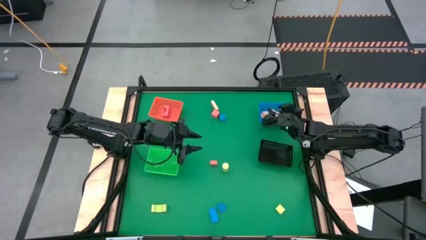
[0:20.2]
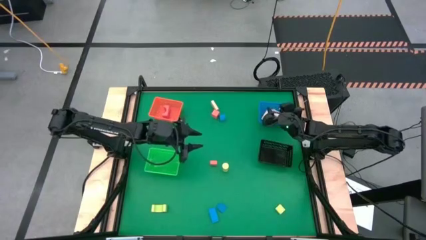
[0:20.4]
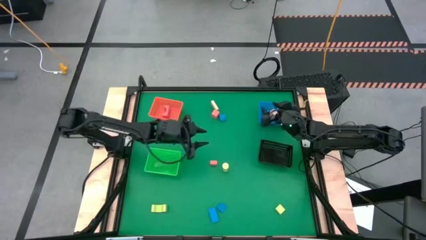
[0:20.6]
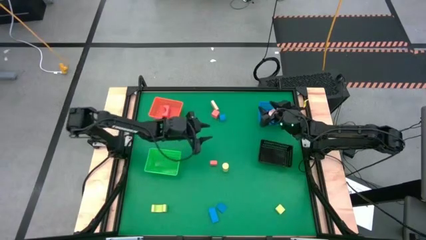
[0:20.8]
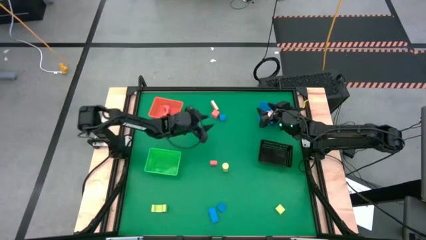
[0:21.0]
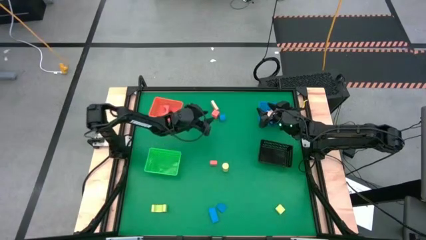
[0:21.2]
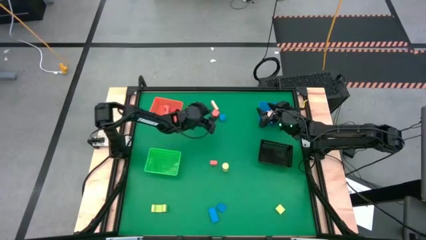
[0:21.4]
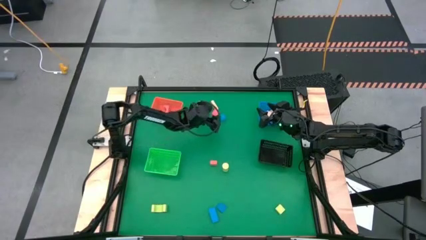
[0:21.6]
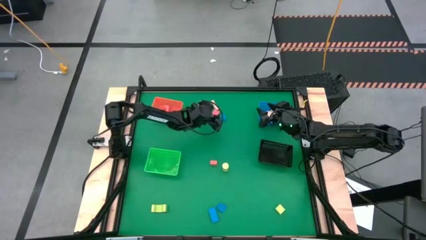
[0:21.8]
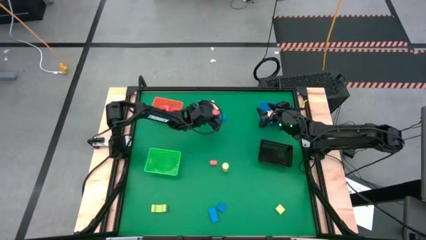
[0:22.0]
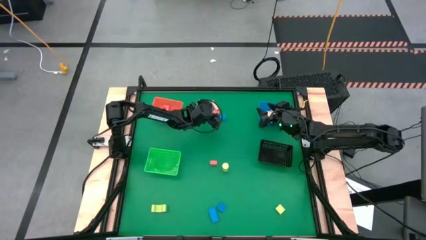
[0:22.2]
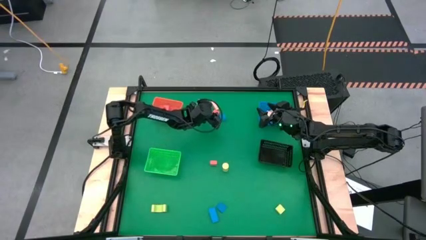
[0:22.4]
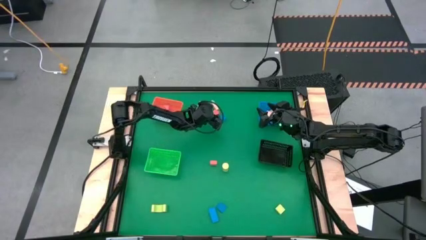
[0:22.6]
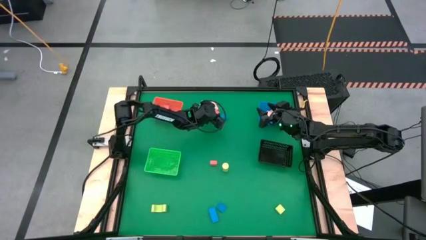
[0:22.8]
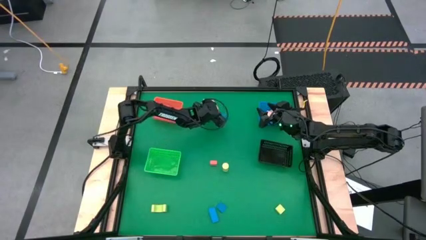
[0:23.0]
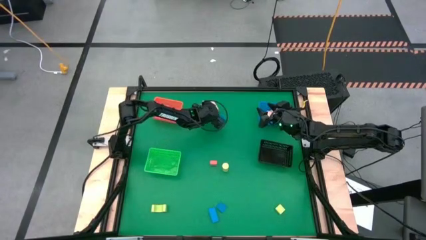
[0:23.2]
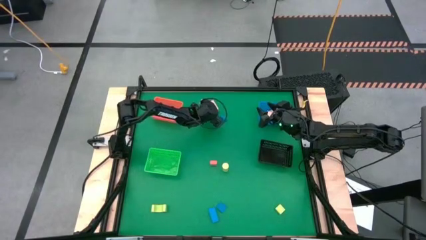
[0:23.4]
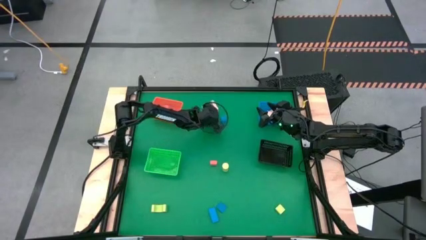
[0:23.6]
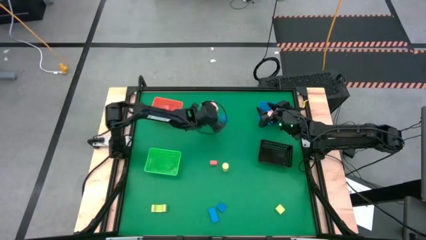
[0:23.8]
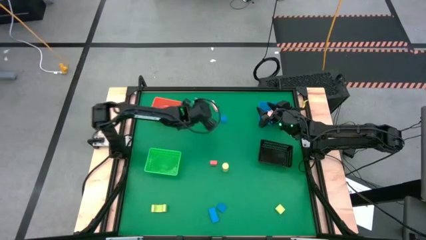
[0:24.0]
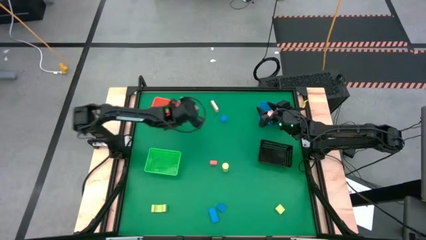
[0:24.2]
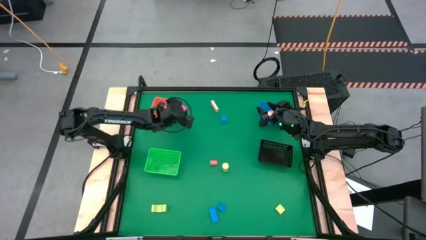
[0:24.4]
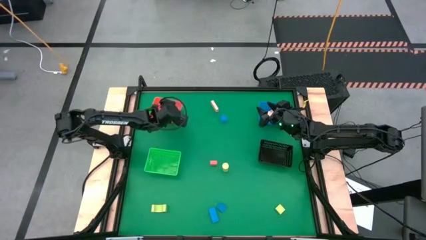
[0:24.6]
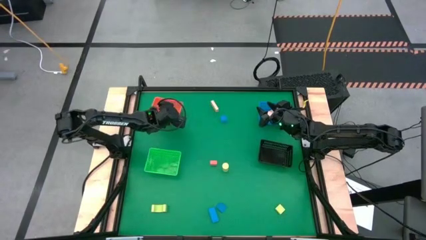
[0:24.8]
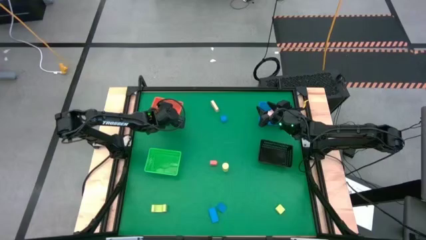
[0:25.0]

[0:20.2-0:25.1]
Task: Sort & place blocks by color
Put the top red block into the orange basket

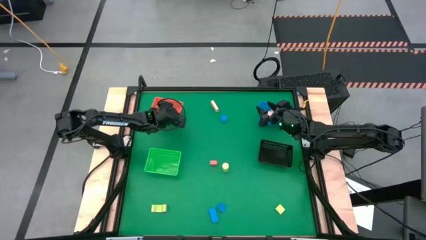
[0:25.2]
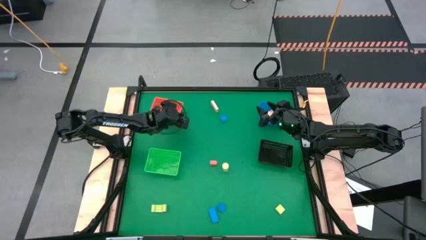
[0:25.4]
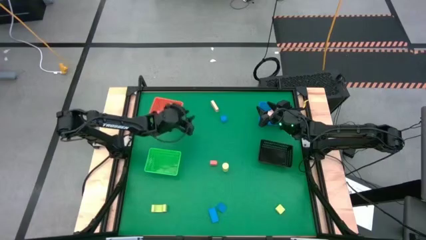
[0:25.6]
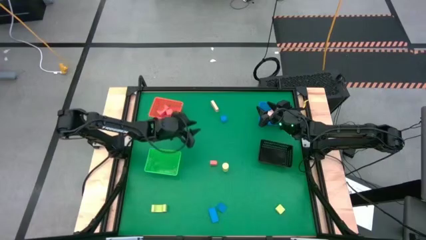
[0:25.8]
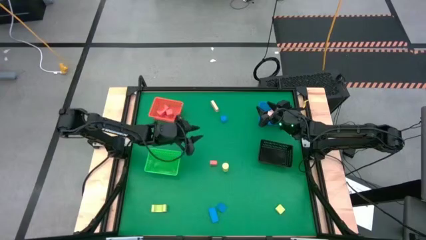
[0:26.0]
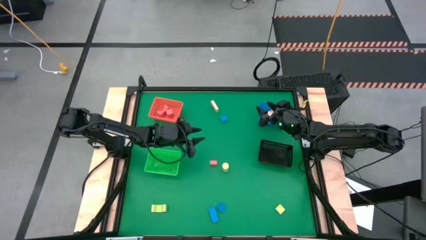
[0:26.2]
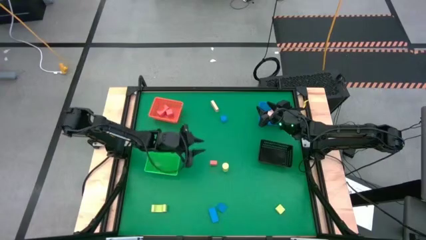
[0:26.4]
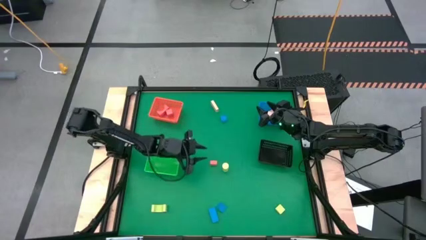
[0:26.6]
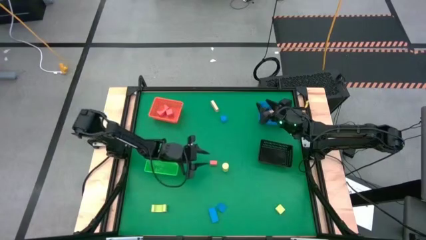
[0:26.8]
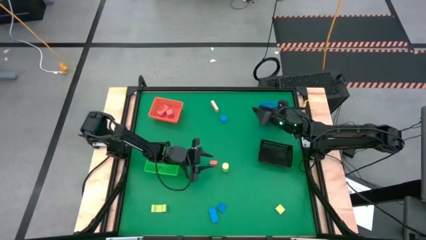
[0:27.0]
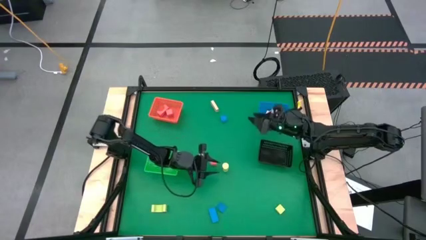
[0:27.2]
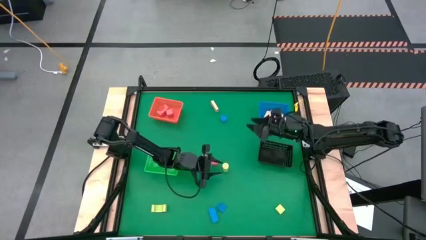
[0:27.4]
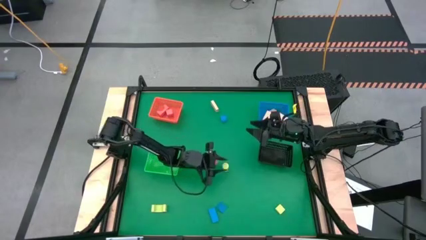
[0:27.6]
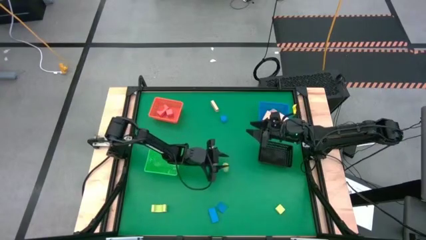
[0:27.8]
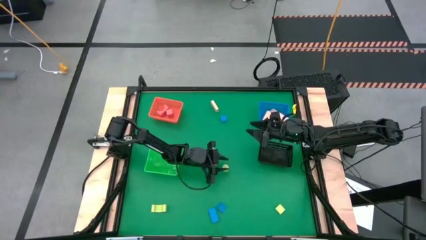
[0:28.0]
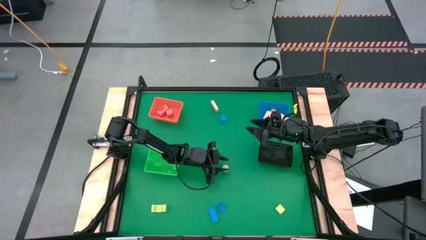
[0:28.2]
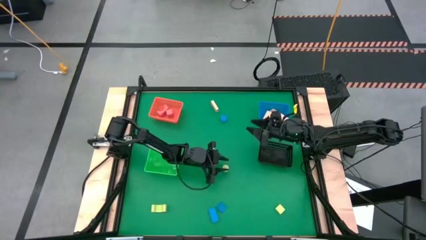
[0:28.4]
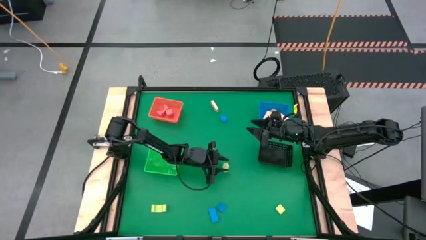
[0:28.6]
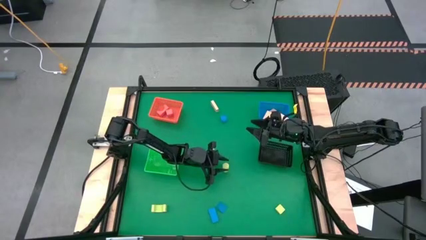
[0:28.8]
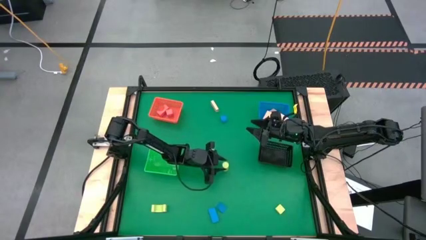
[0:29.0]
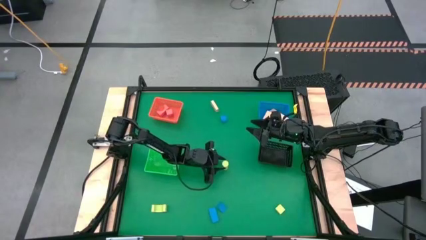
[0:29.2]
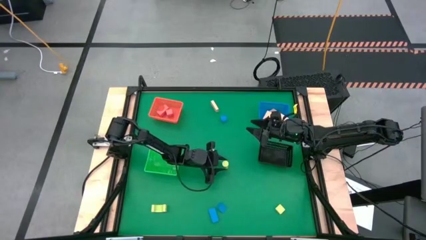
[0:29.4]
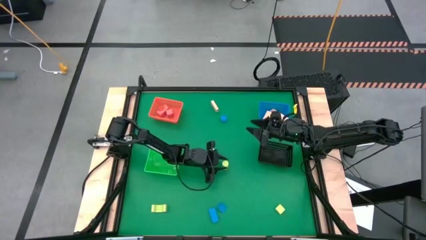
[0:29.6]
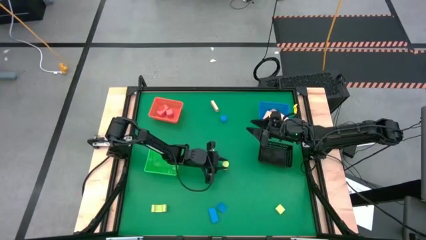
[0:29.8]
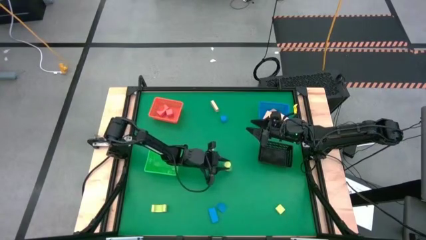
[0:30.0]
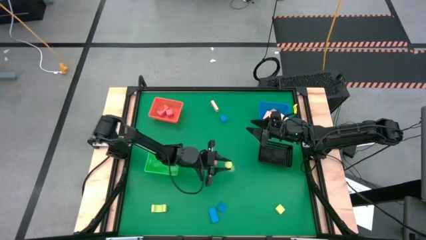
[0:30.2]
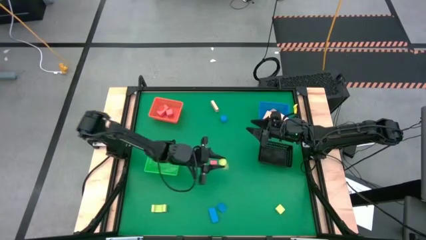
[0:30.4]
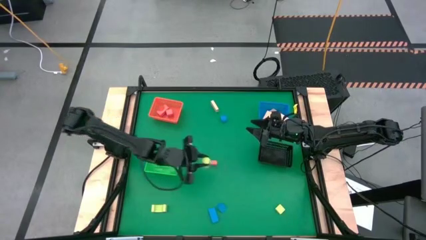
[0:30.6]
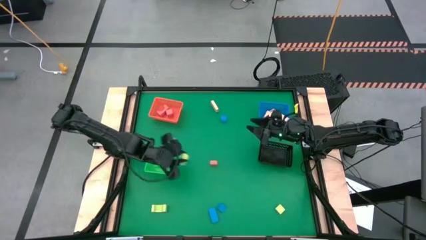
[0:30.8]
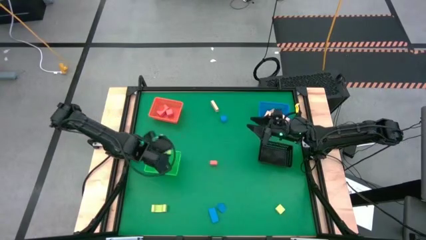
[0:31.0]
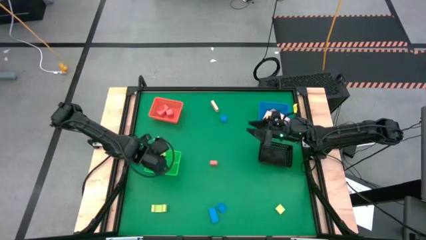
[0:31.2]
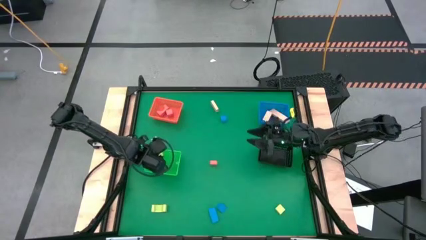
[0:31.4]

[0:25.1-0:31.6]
Put the middle green block into the green basket

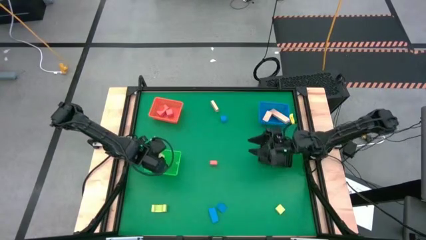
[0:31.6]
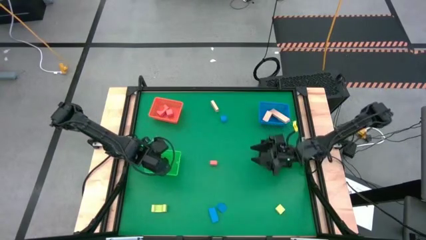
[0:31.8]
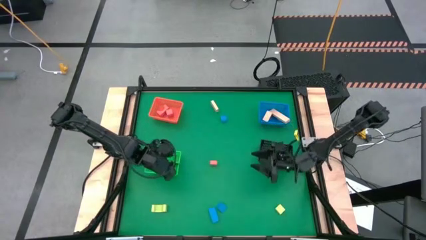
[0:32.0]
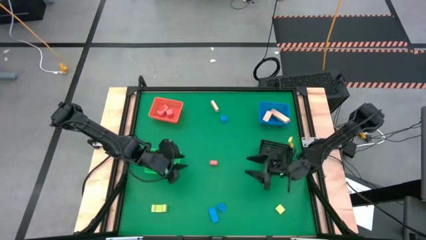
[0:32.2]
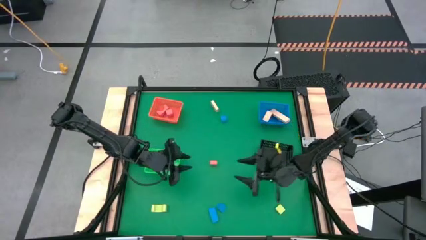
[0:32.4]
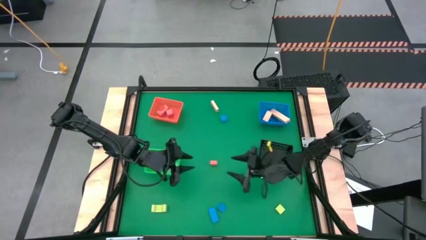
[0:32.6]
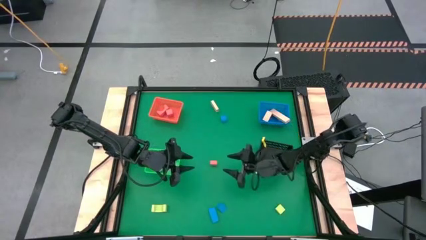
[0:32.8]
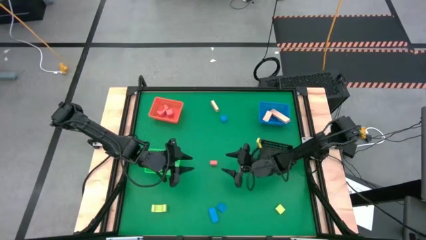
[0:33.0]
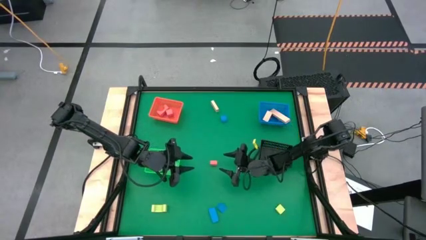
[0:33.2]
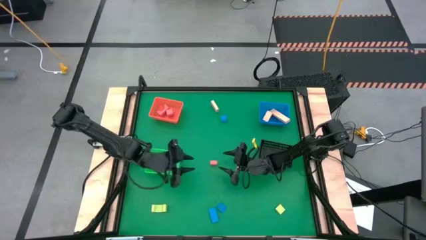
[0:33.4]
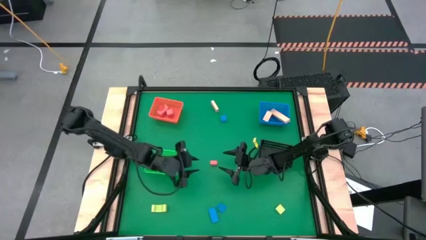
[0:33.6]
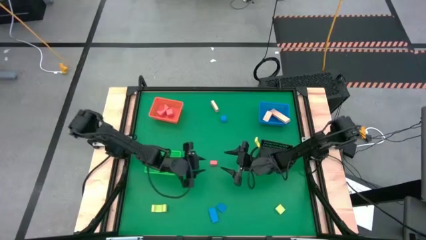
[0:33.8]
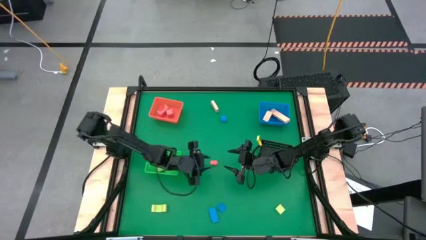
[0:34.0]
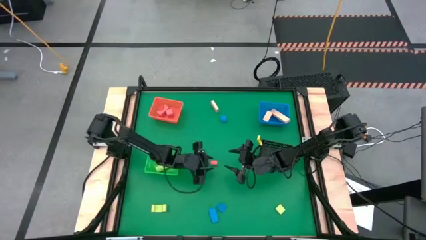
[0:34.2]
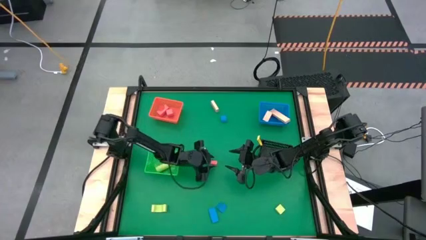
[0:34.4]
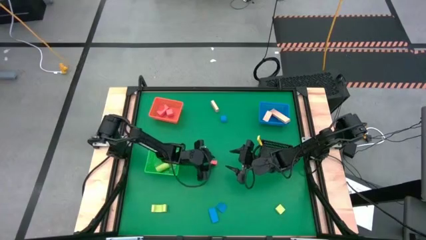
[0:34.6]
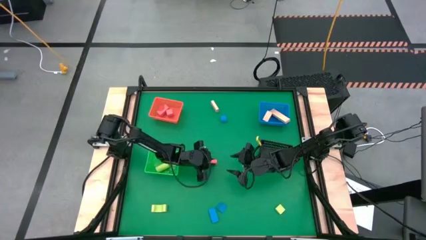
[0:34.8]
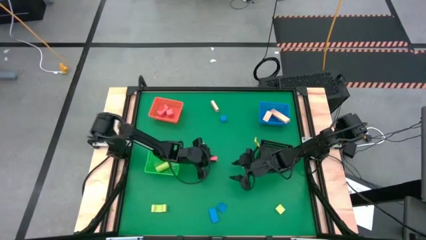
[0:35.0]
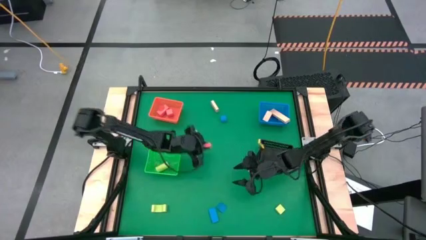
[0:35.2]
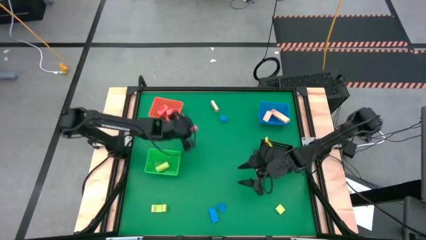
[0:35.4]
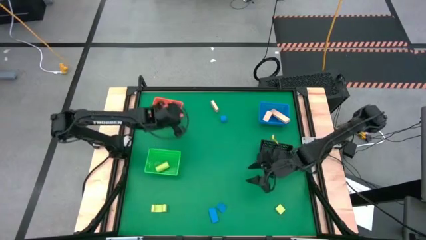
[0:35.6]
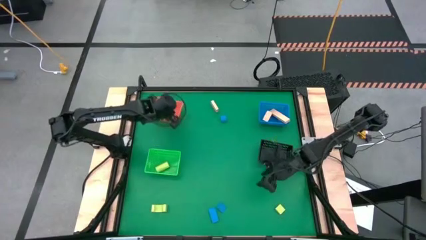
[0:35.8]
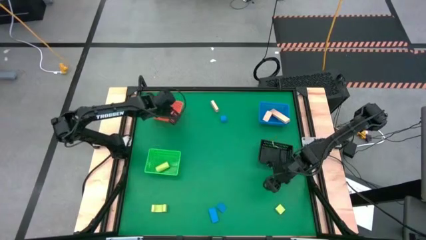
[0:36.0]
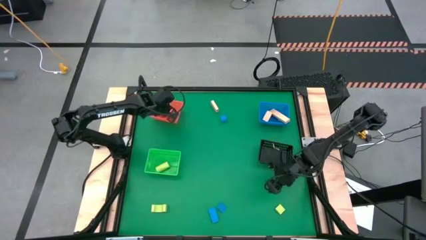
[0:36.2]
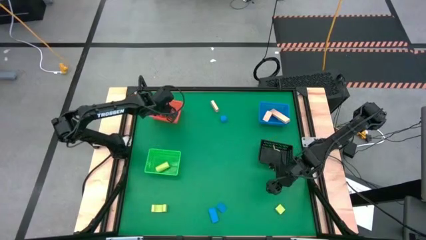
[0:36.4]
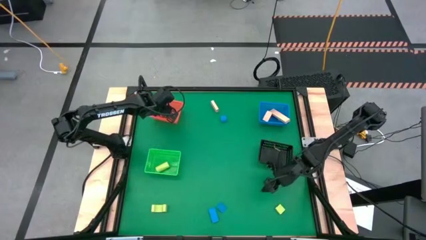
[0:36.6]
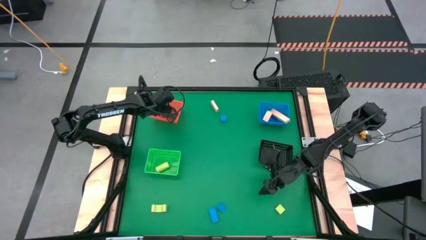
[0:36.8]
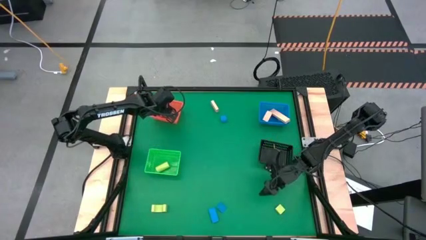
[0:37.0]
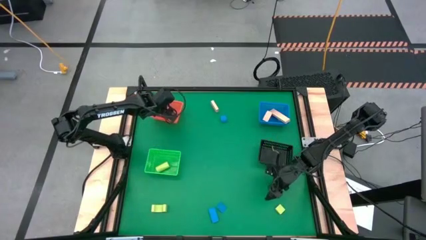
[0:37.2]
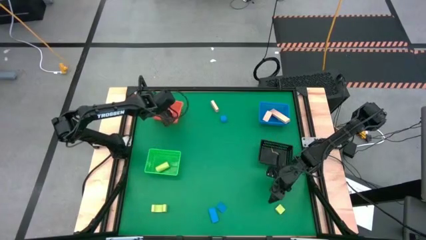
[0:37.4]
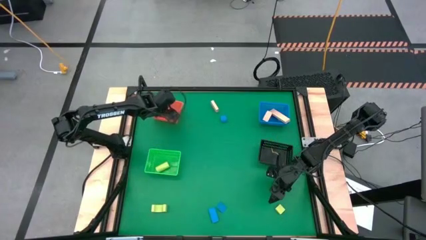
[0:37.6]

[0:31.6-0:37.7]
Put the red block into the orange basket
